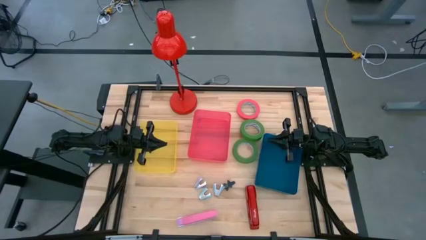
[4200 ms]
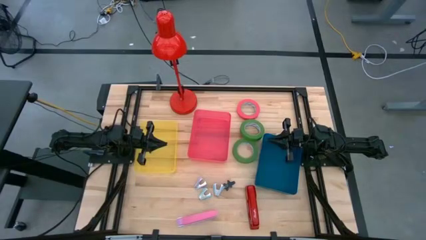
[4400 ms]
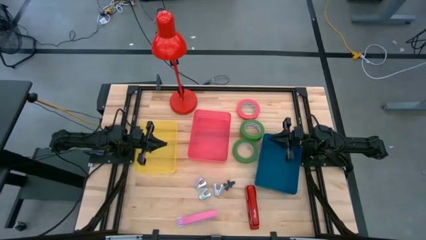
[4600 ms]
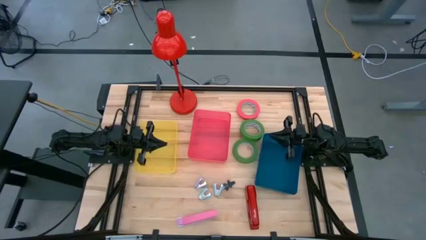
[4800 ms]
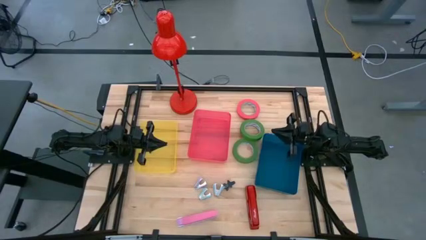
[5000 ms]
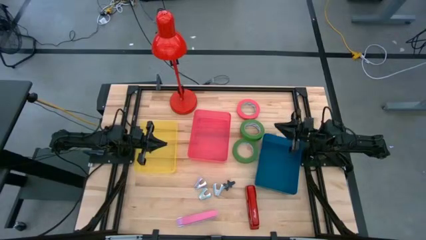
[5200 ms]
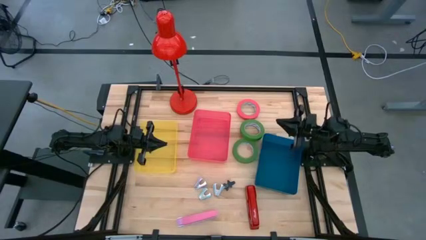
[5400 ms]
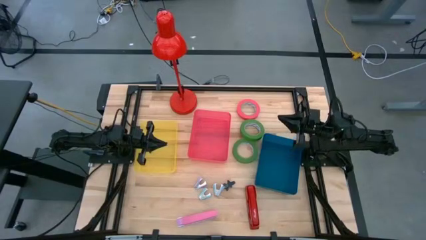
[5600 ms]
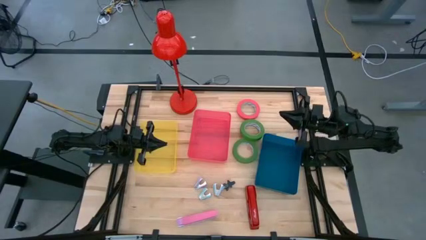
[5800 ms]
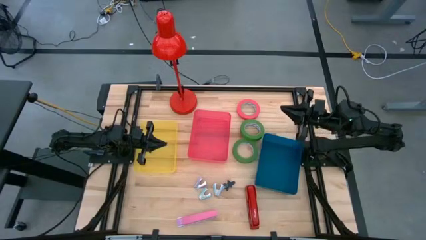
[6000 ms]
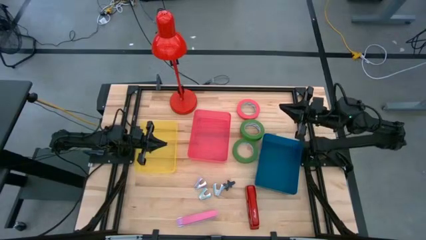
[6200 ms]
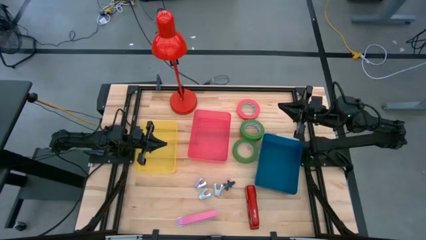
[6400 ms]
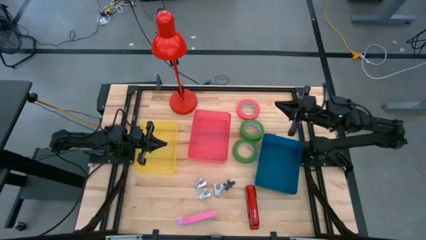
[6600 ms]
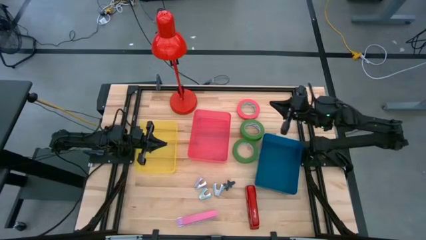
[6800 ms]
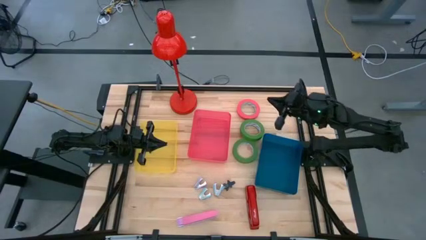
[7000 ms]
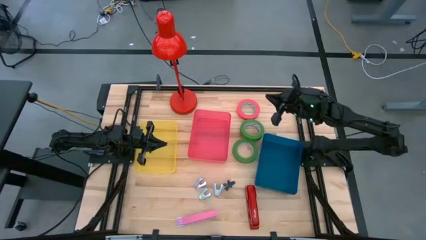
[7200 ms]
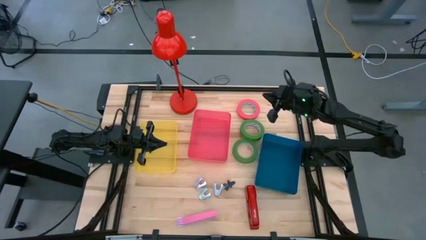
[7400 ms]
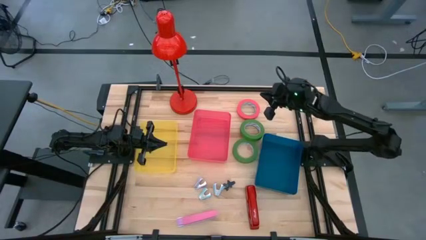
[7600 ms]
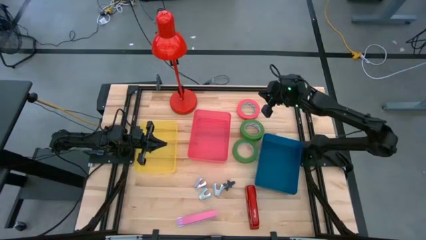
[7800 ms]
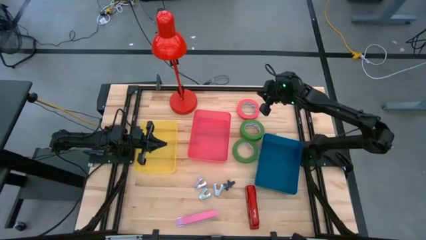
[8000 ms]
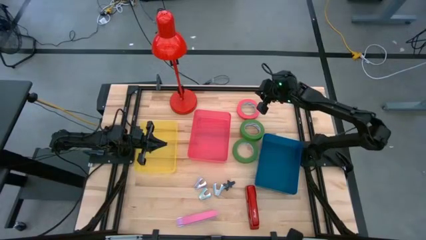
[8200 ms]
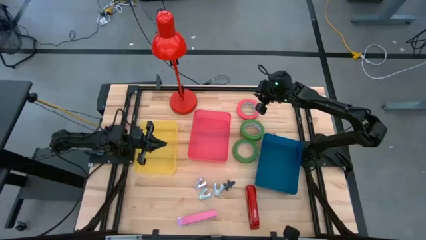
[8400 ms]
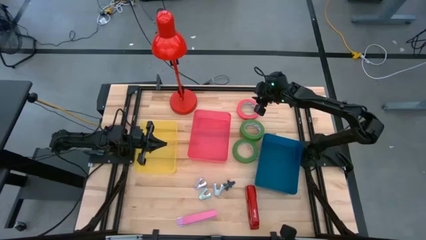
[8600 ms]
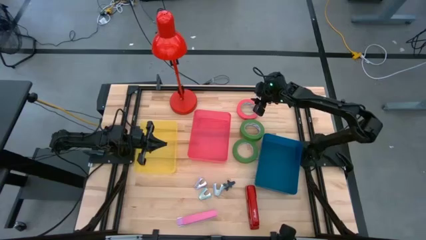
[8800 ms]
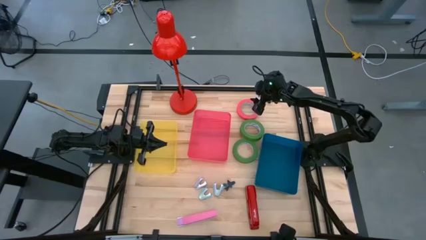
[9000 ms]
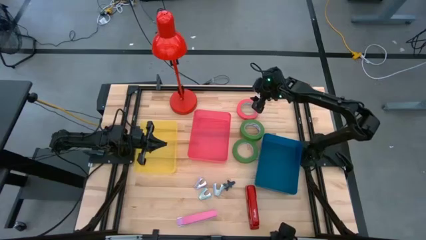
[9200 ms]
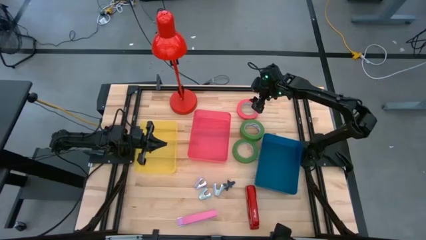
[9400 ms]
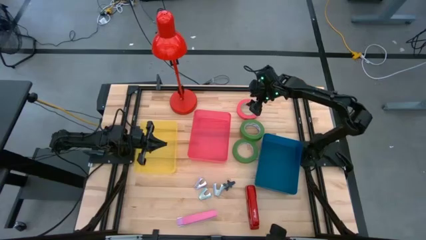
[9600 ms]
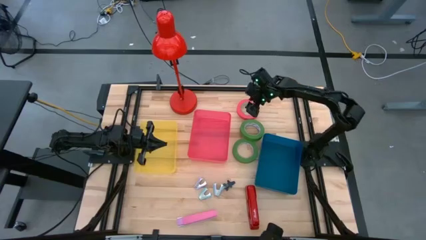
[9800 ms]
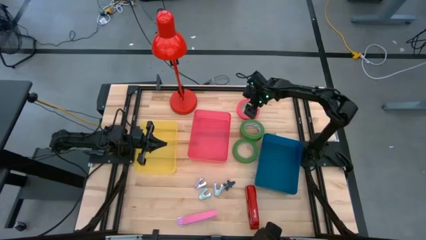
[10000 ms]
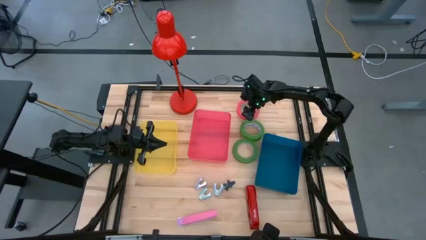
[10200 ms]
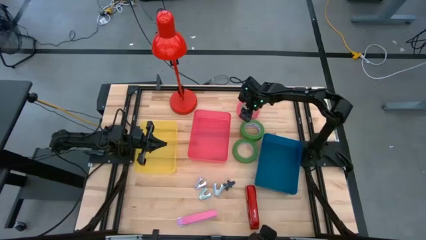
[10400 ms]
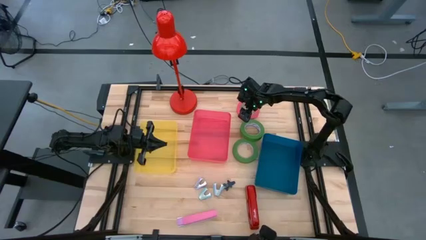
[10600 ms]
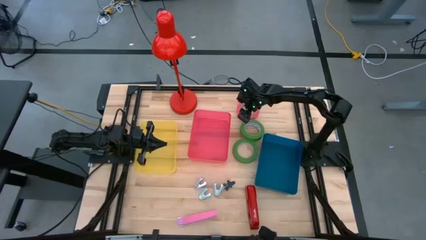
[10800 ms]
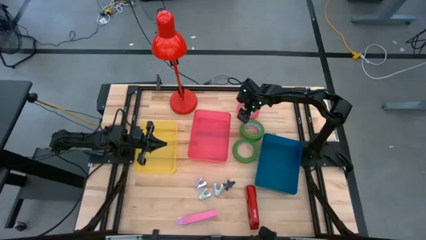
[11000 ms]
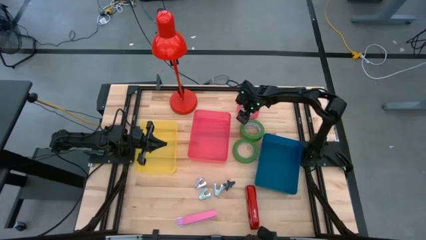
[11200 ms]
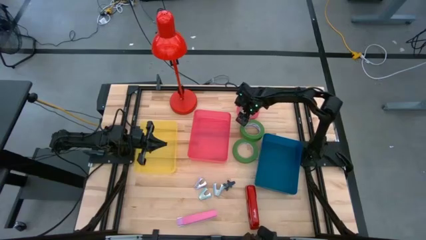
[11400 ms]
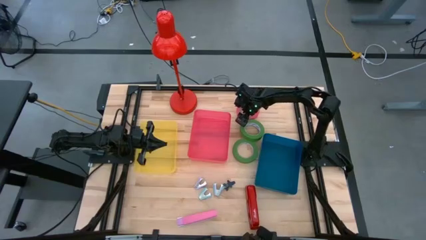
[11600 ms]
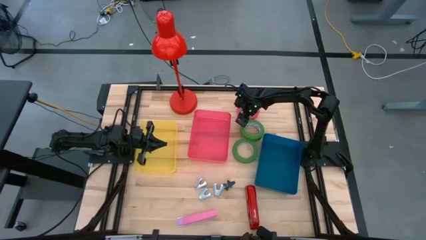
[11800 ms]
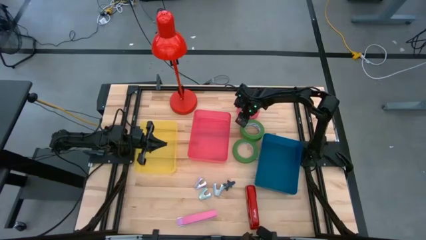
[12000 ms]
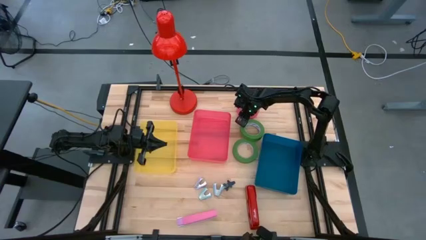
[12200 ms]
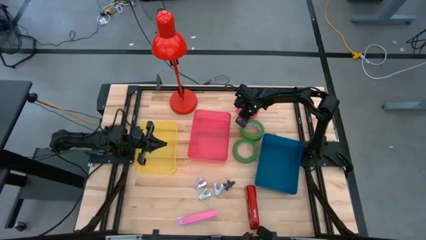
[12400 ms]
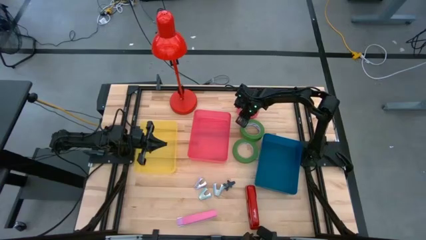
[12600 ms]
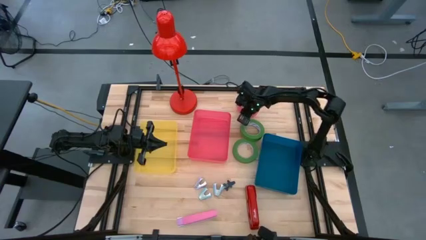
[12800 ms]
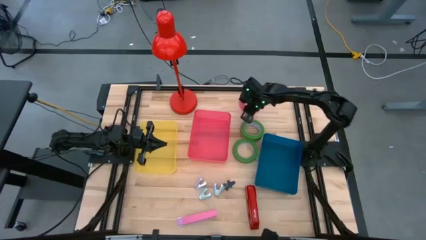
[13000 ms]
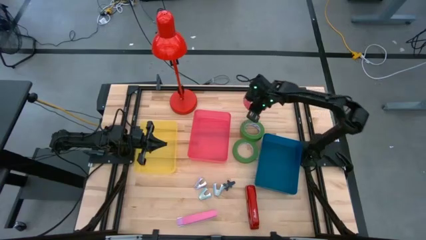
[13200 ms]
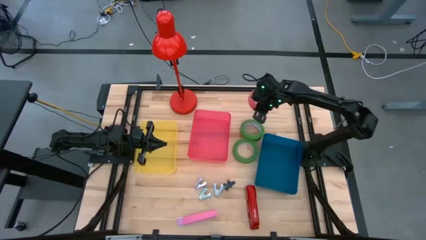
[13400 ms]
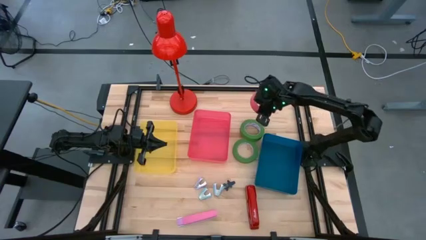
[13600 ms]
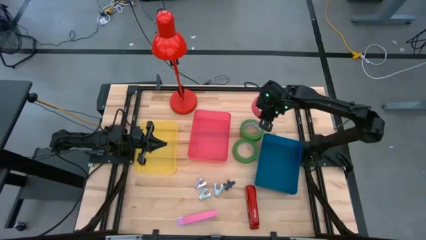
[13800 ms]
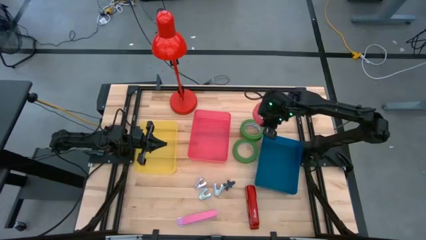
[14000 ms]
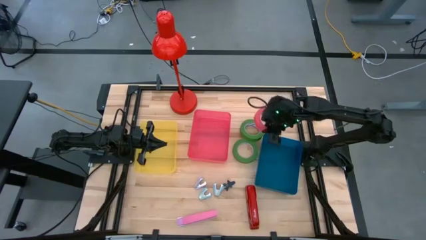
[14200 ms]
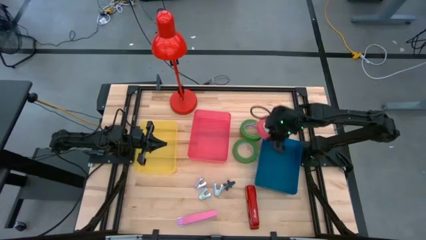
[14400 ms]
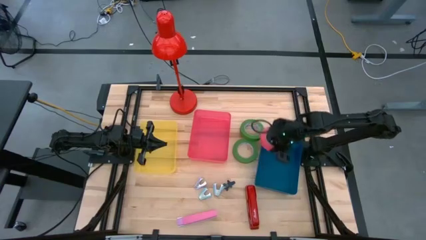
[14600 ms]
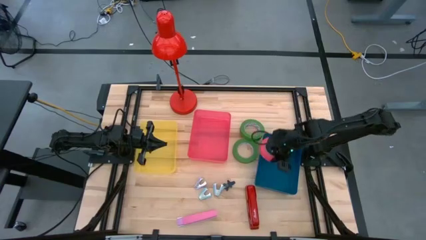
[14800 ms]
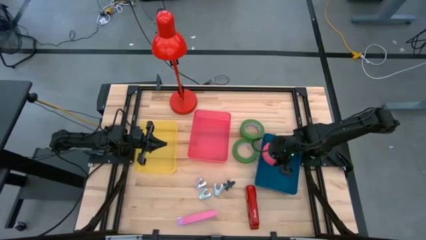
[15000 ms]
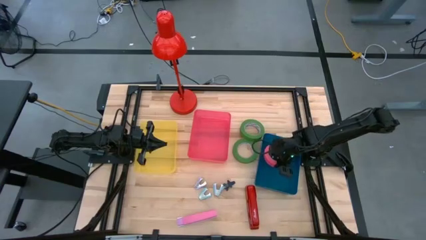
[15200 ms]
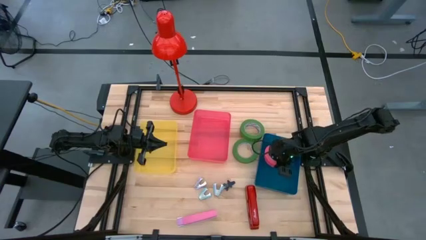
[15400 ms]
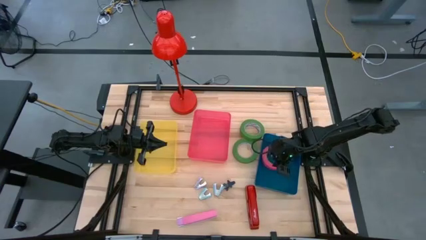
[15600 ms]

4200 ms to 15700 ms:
Task: Pick and place Stapler, Stapler remover, tape
Put the pink tape into the blue bin

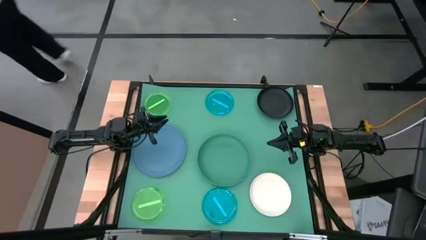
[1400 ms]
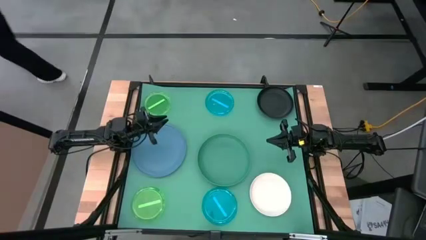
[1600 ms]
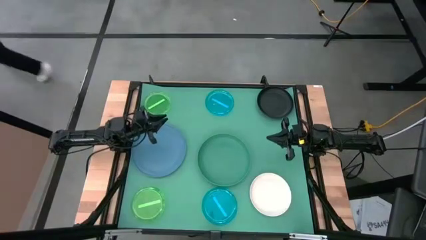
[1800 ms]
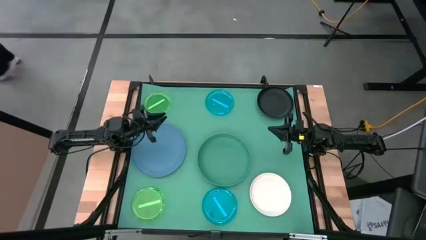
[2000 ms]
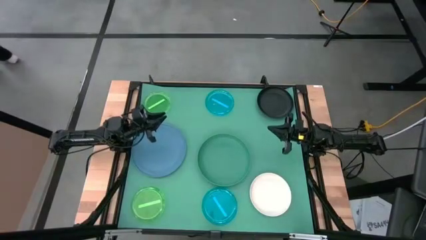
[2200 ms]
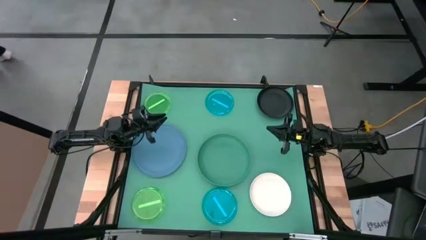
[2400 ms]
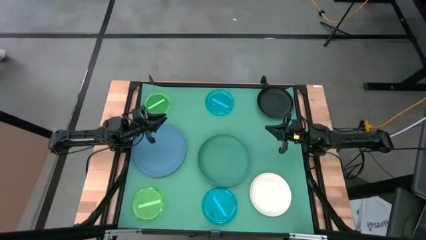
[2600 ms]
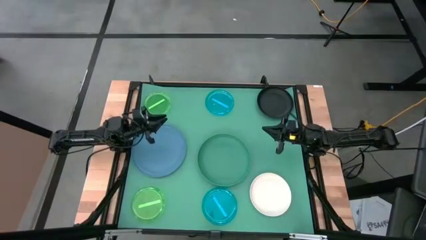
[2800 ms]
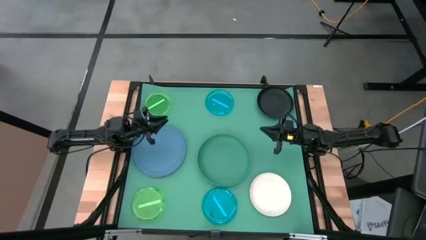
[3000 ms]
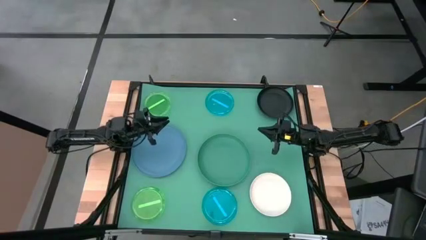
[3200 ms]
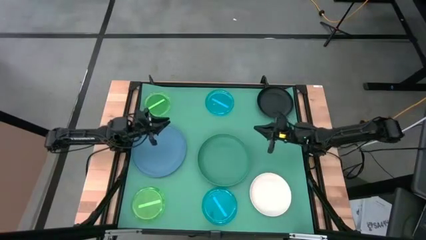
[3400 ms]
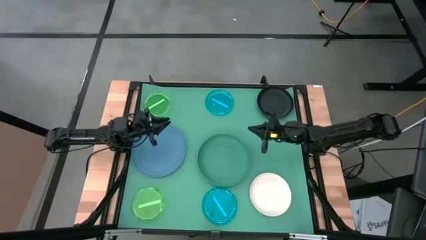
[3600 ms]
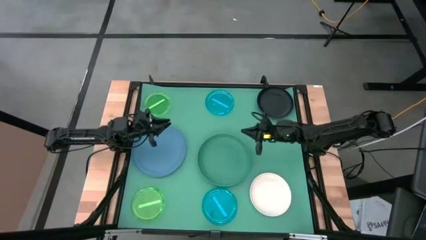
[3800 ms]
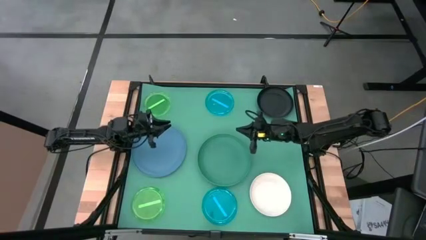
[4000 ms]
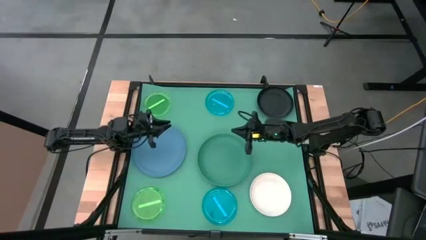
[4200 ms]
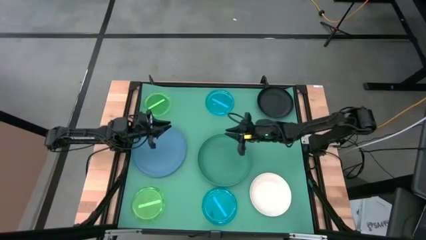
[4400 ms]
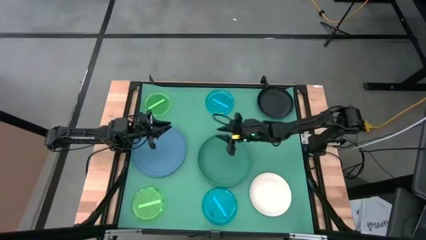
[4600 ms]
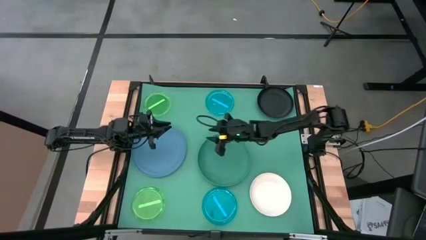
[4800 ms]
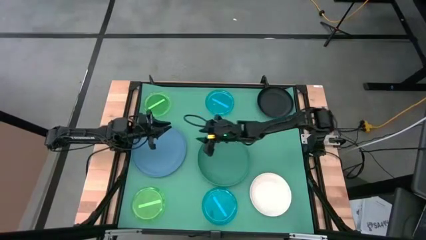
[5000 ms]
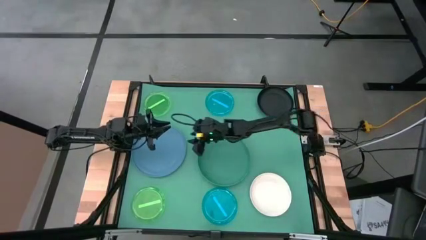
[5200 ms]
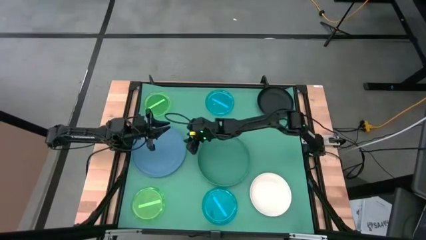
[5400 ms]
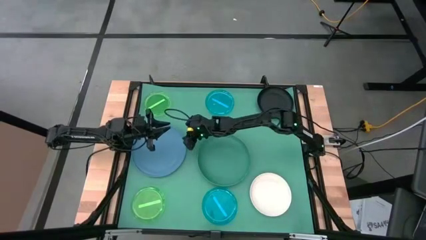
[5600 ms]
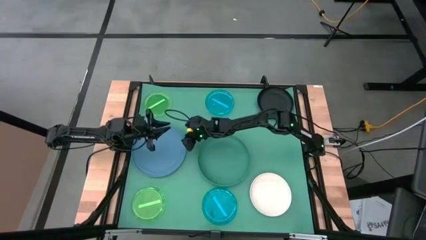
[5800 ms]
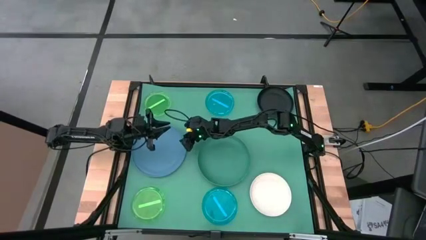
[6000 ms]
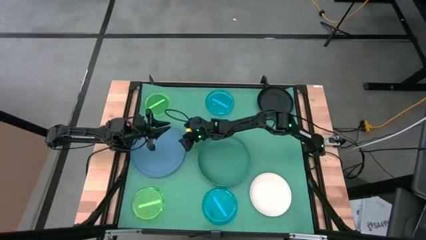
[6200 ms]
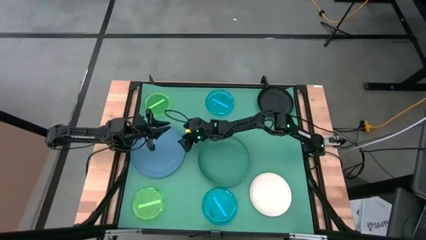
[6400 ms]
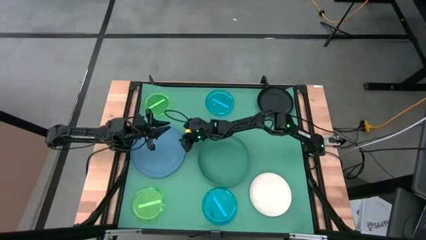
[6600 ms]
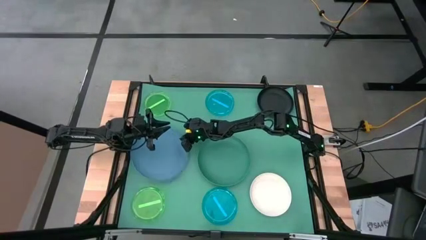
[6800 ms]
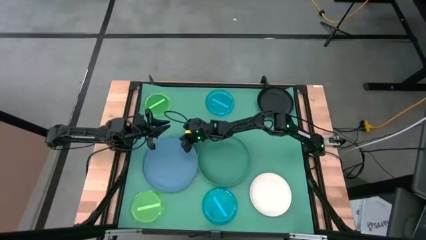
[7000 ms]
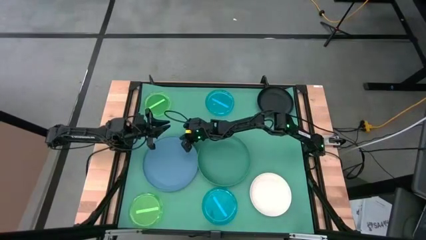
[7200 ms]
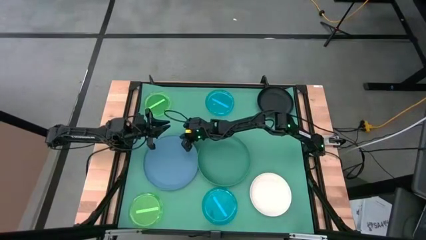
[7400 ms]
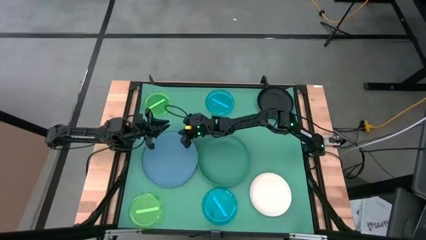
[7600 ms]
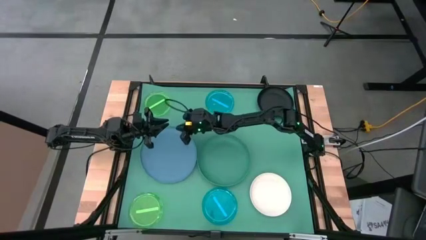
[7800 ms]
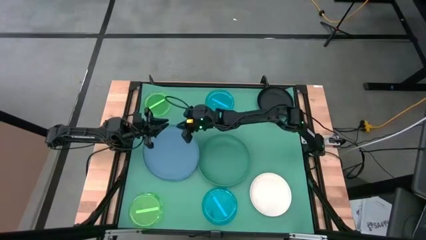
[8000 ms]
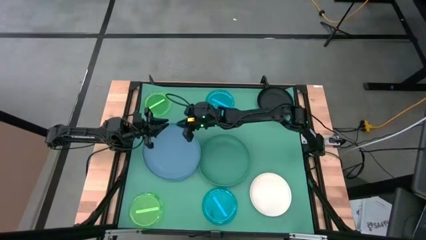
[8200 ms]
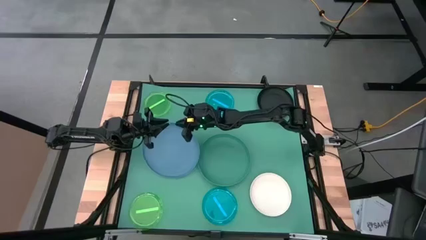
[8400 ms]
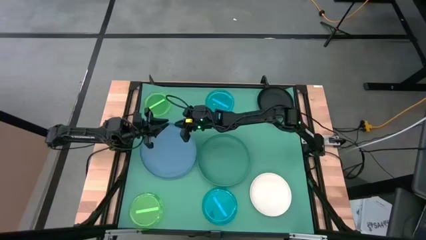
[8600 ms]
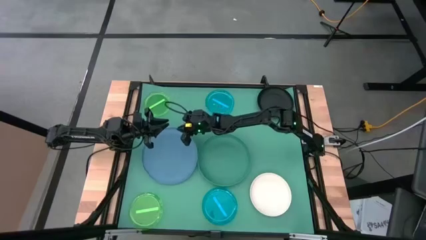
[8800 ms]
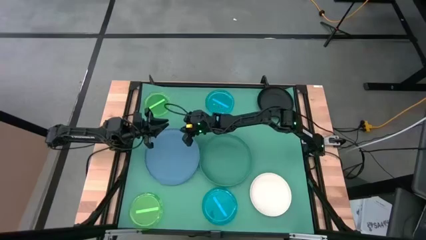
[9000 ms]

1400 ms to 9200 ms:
Task: Stack plastic plates
Adjust the light blue plate
